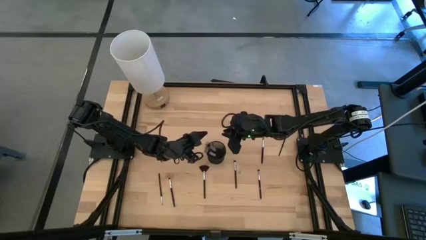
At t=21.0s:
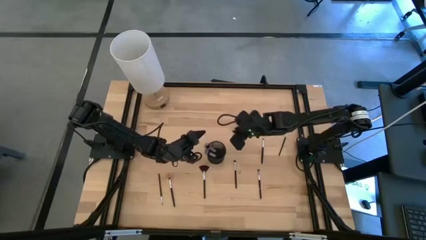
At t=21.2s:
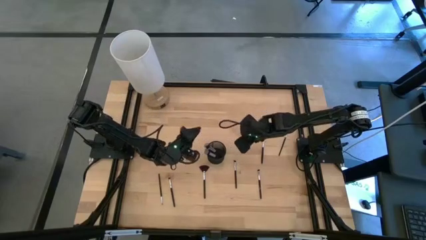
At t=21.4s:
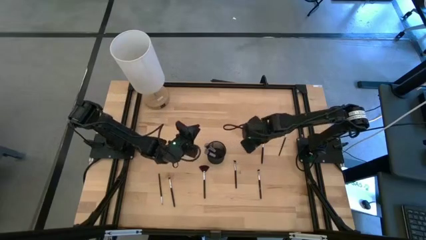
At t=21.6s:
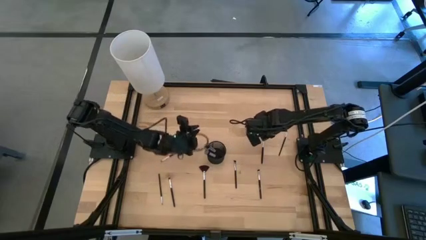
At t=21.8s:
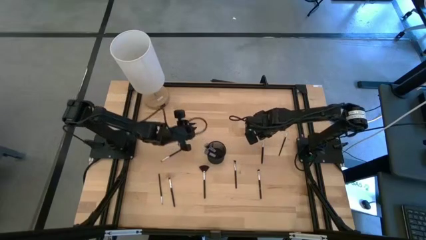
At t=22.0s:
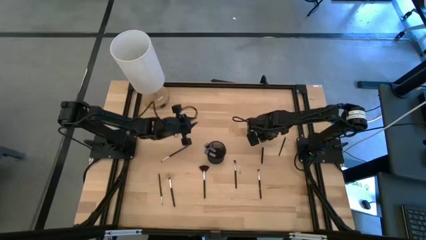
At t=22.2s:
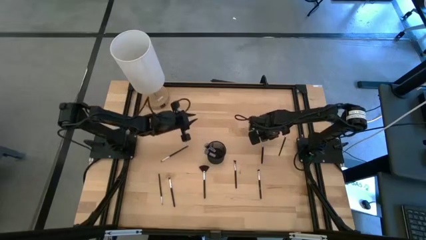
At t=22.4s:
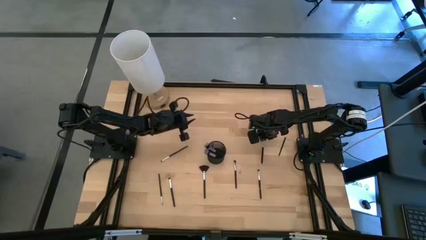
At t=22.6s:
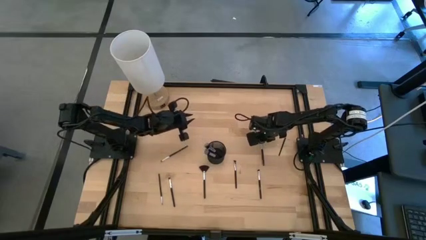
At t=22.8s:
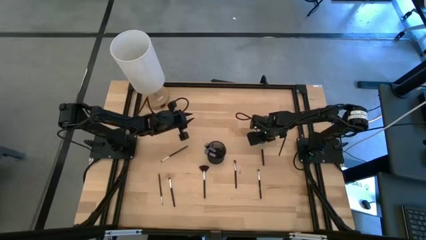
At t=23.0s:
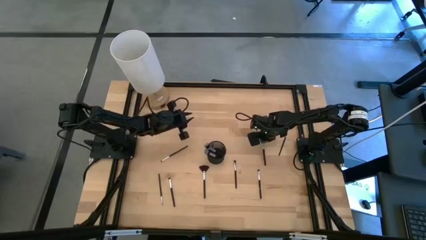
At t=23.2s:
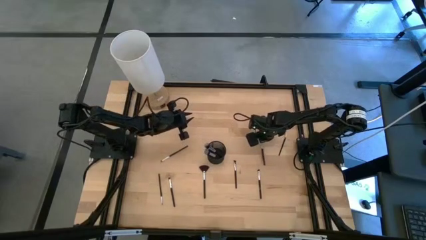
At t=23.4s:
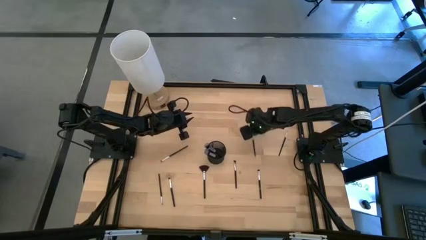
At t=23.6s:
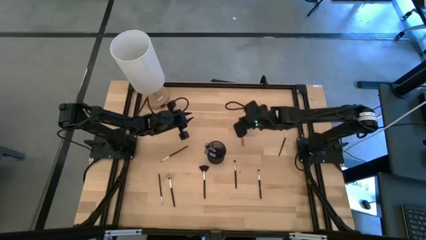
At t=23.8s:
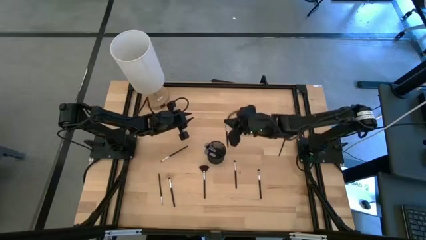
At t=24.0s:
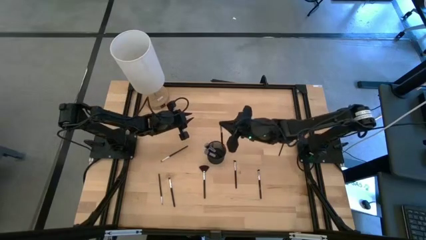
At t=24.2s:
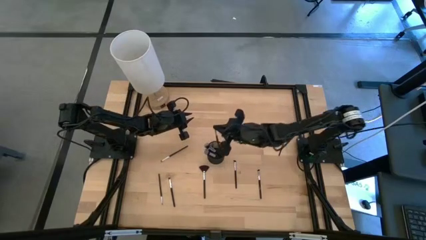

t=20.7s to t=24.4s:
Task: Pick & Place Makeup Brushes
Put the eyeshadow brush into the makeup organizer

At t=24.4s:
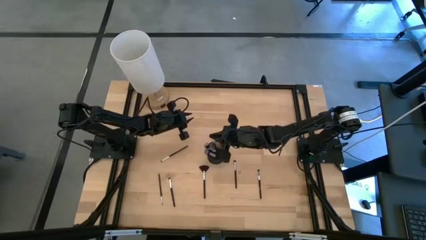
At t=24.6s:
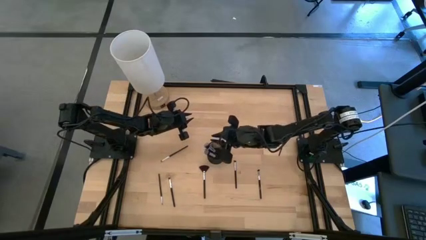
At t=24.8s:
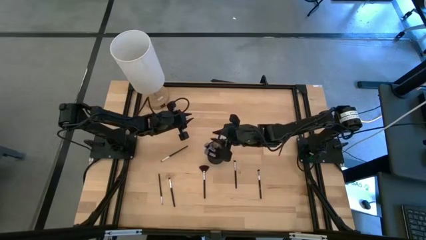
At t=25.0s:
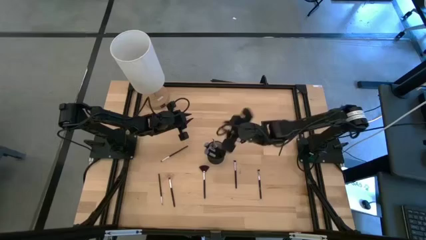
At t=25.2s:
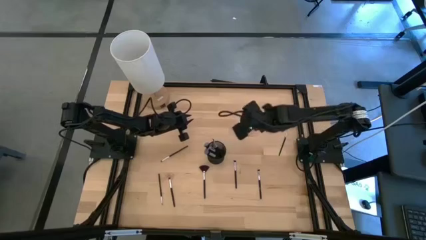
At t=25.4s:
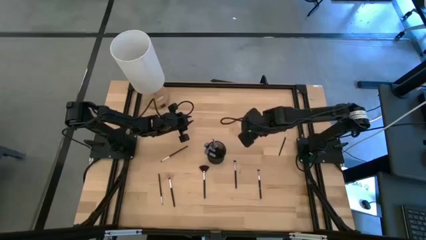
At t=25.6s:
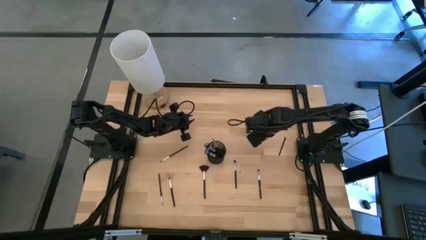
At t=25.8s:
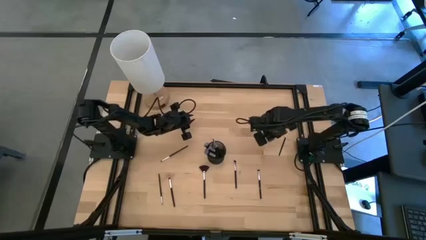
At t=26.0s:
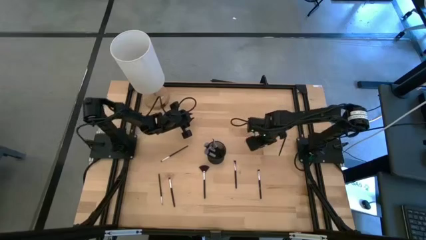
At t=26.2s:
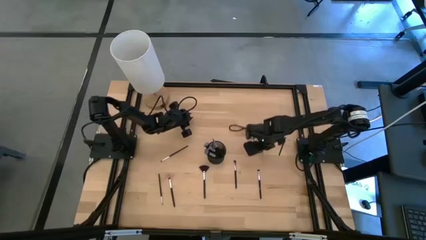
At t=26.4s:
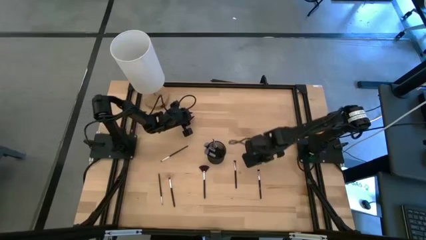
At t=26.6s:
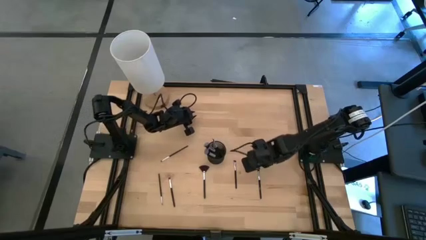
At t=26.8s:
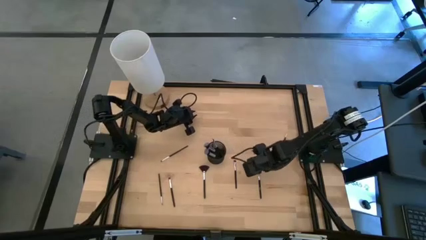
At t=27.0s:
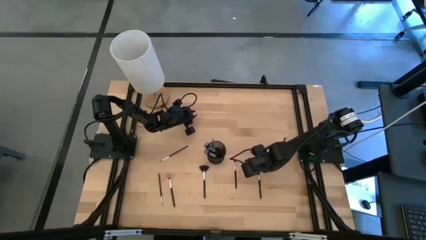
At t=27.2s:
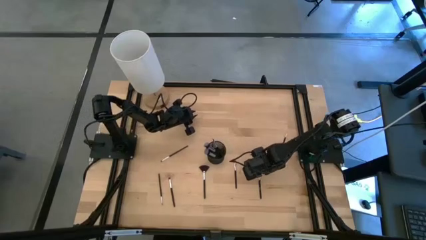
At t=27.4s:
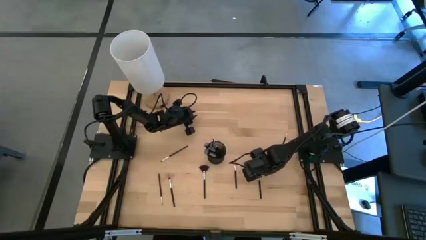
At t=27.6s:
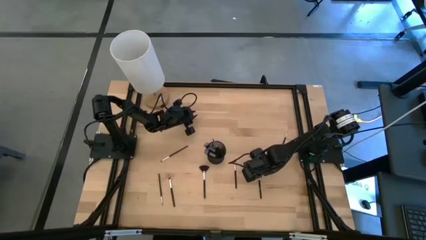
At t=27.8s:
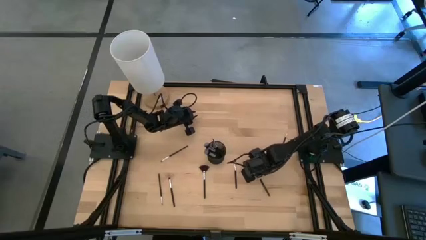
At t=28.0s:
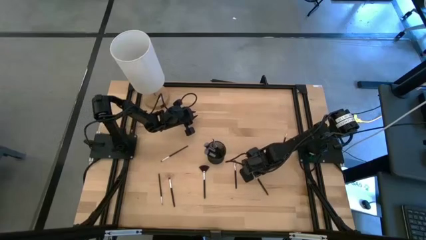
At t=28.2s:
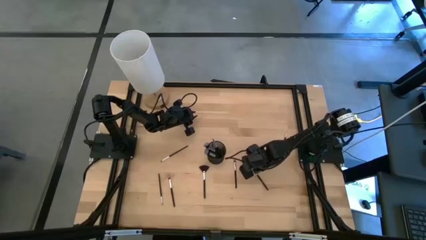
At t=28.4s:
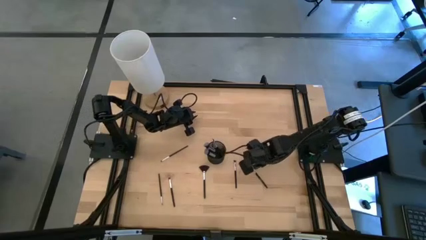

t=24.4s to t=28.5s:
Put the eyeshadow brush into the makeup organizer

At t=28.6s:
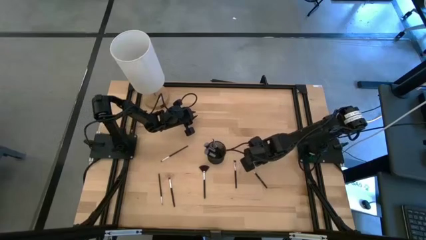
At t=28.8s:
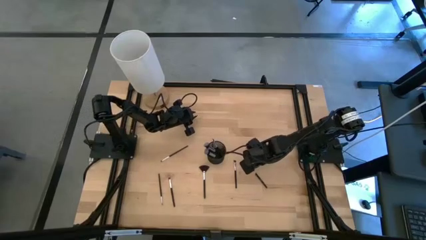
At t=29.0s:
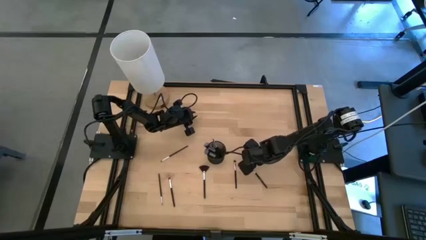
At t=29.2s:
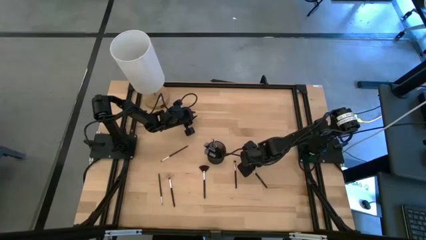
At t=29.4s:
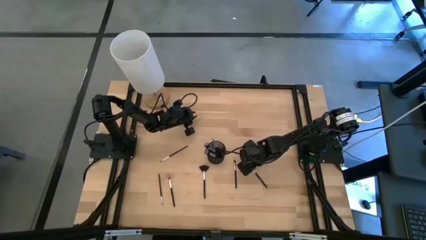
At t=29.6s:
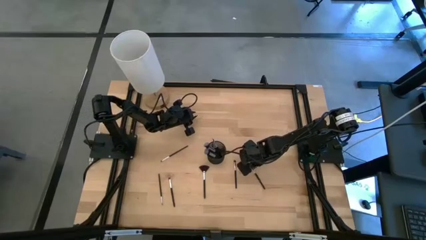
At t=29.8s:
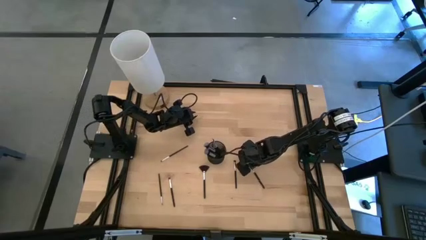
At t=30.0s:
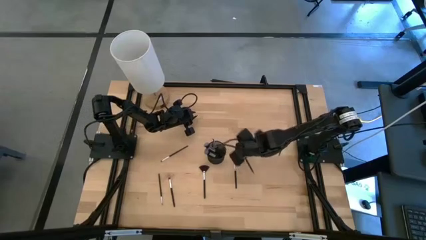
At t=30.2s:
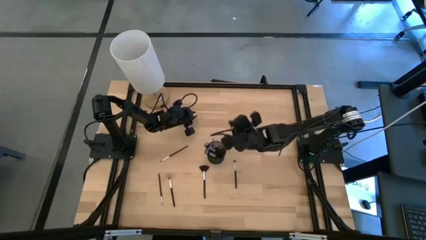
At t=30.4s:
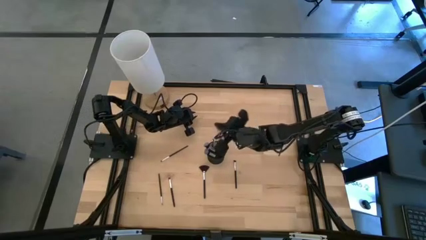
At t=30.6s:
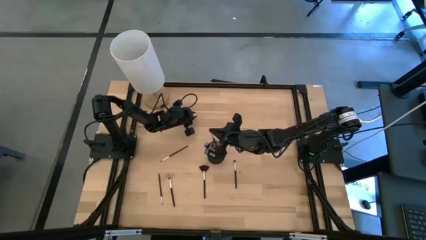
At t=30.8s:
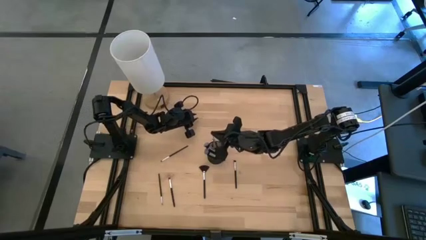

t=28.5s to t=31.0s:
Put the eyeshadow brush into the makeup organizer

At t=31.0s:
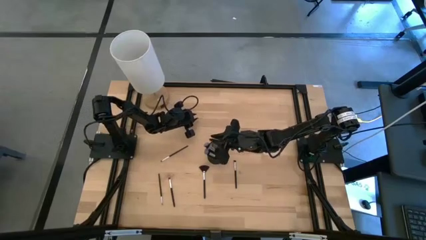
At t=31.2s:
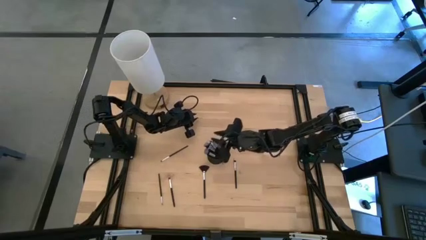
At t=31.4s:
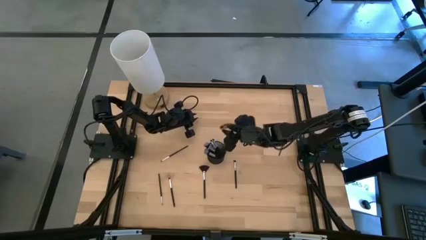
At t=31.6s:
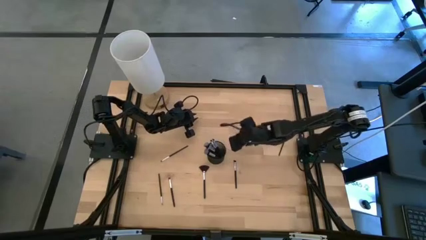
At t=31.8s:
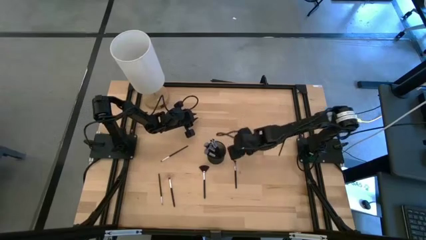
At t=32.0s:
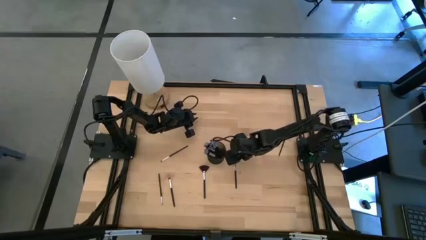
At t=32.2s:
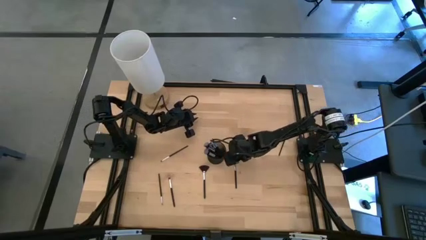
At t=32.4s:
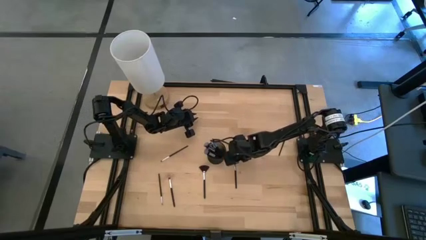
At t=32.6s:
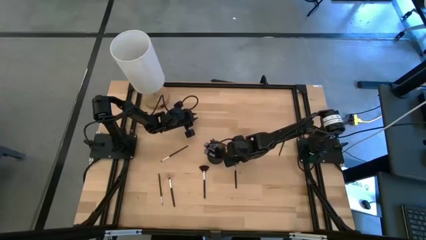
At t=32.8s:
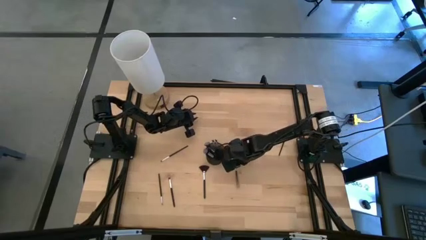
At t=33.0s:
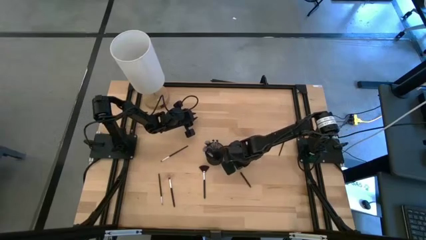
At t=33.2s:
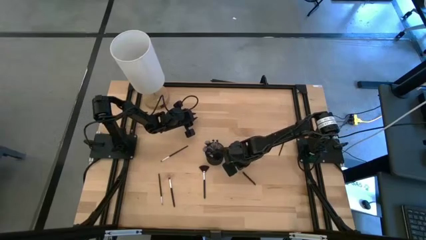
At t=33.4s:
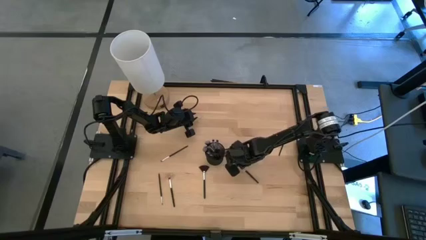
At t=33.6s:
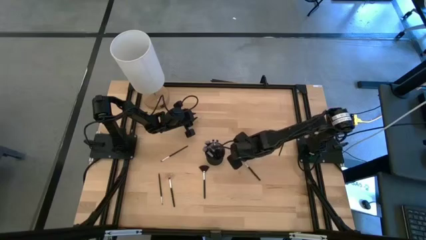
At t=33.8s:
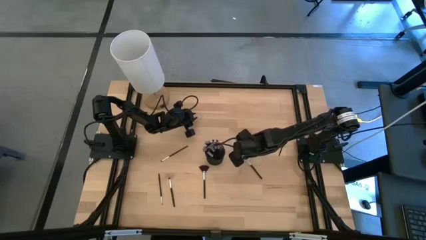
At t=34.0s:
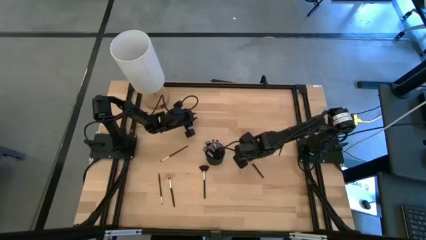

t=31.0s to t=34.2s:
Put the eyeshadow brush into the makeup organizer

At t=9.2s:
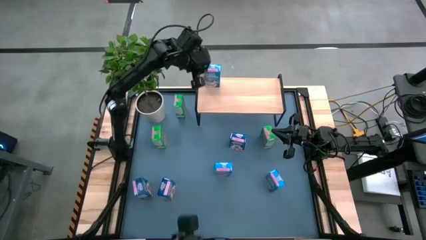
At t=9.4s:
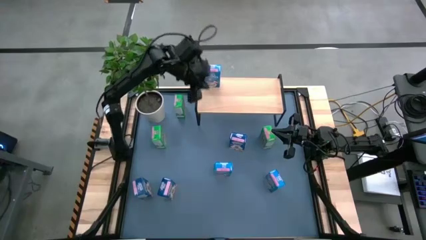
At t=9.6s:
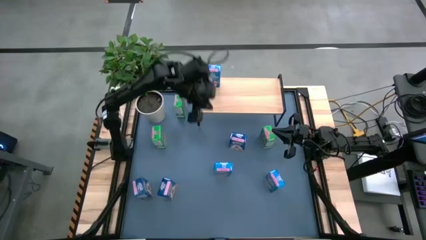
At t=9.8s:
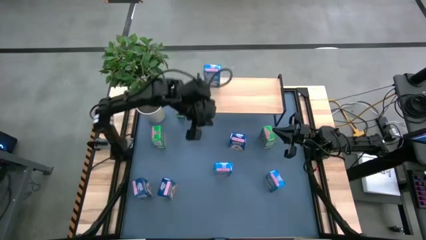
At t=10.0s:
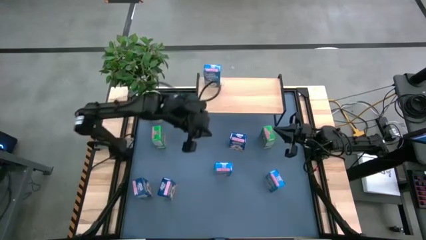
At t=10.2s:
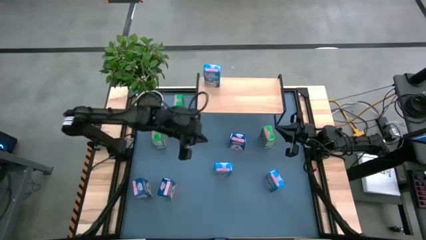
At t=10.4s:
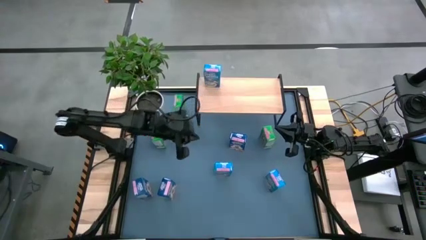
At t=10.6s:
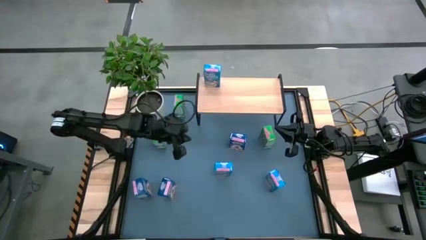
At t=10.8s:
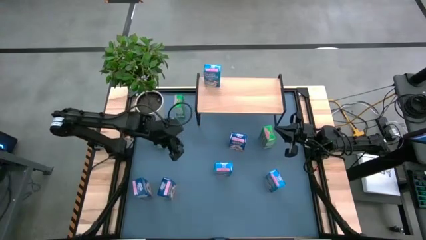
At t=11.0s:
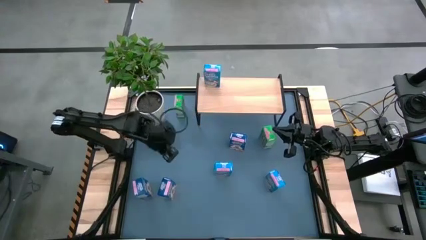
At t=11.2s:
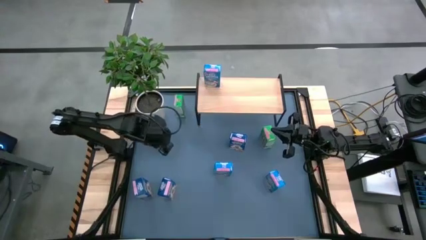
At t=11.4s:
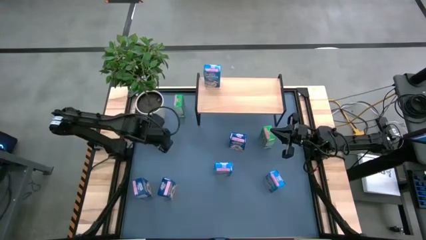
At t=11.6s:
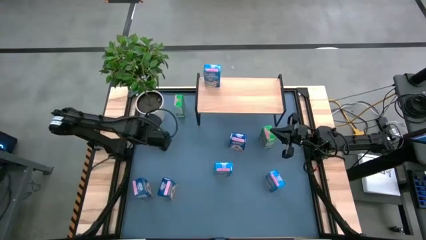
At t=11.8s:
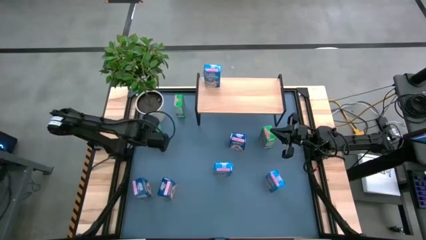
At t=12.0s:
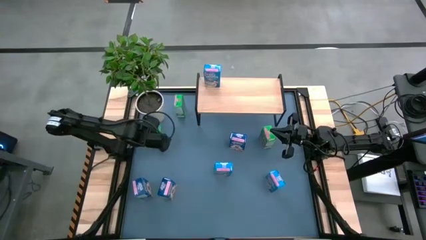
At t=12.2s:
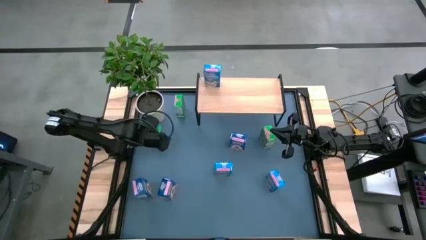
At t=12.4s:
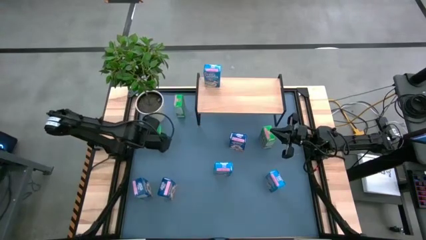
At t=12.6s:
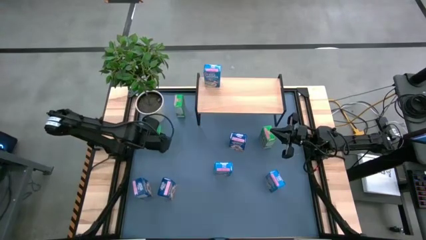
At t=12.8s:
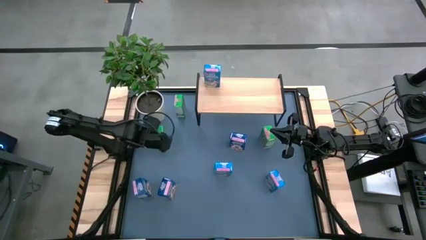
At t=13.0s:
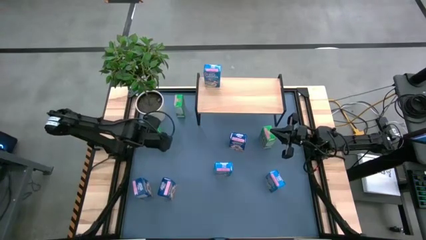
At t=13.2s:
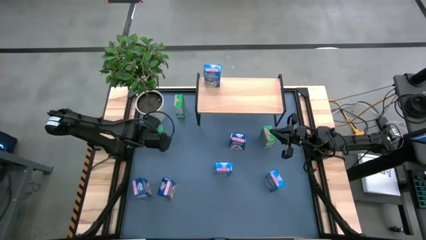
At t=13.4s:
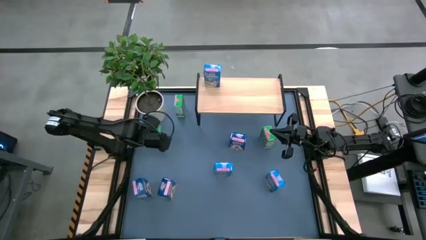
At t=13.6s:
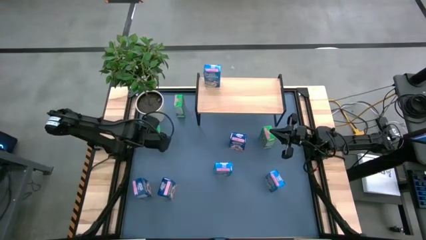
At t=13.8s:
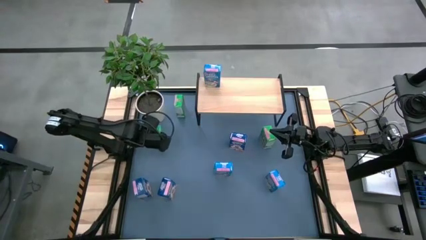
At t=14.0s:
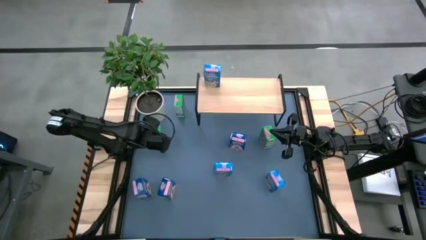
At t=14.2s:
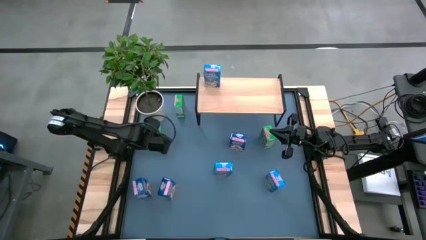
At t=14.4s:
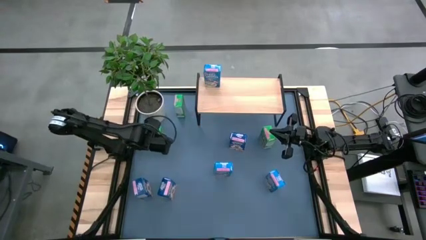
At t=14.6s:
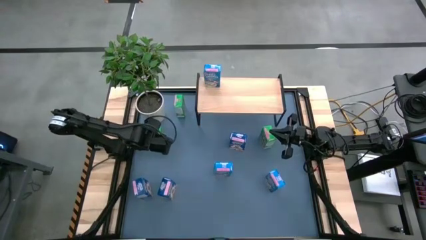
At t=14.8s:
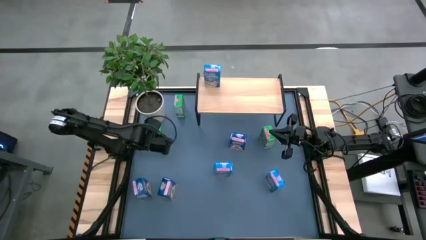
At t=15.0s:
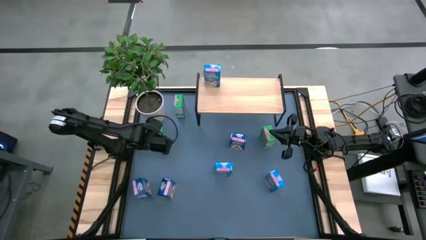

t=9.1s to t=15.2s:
Task: Stack cereal on shelf
Put the bottom left green cereal box on the shelf
